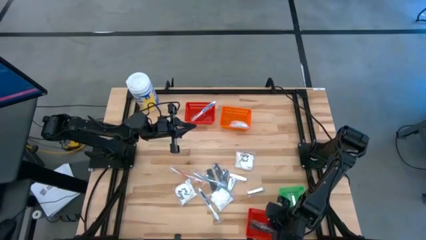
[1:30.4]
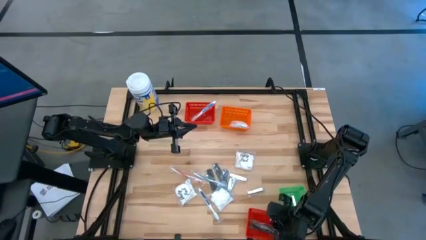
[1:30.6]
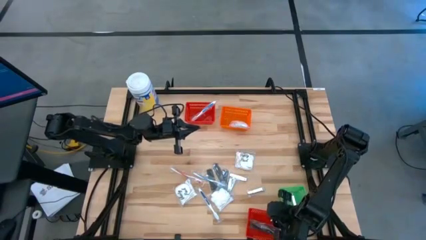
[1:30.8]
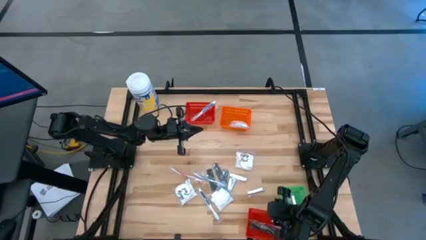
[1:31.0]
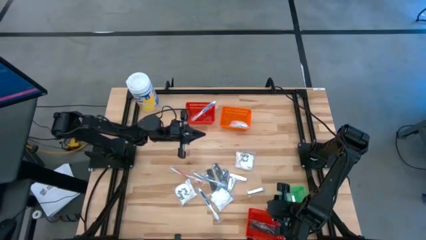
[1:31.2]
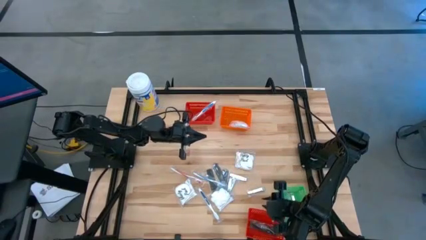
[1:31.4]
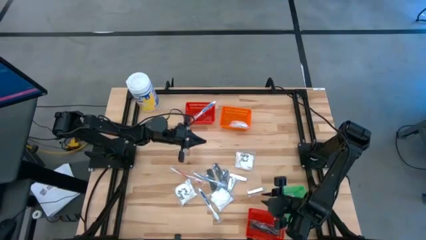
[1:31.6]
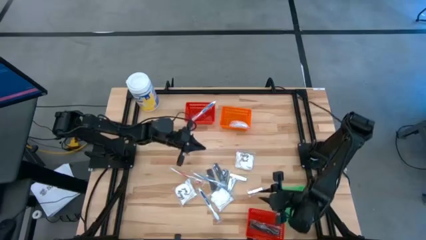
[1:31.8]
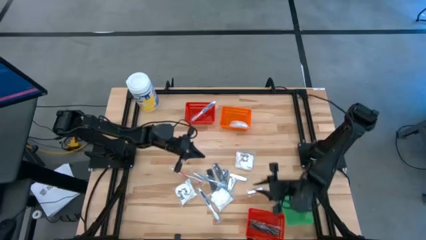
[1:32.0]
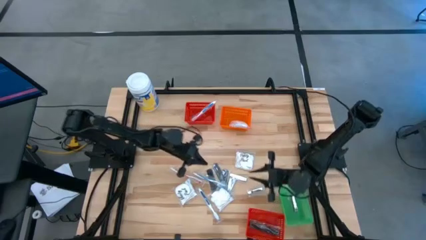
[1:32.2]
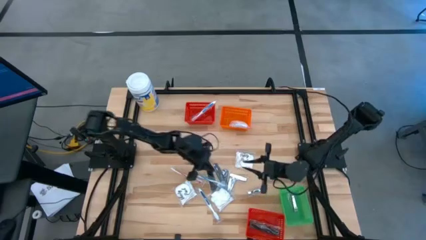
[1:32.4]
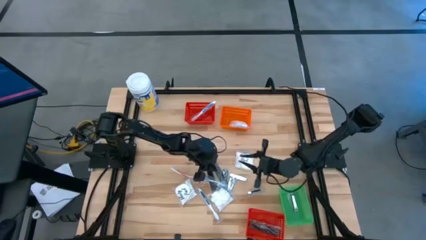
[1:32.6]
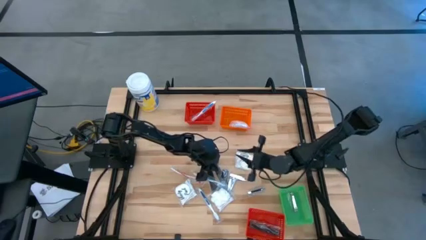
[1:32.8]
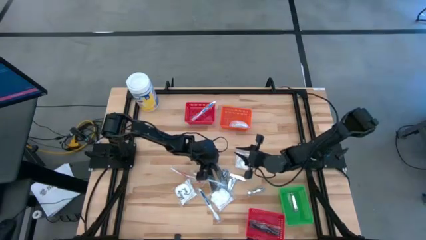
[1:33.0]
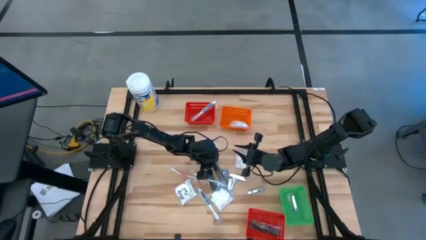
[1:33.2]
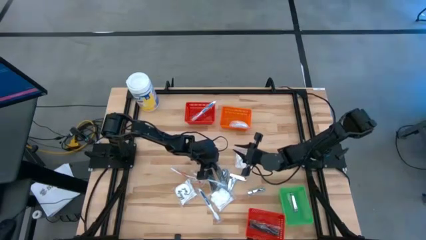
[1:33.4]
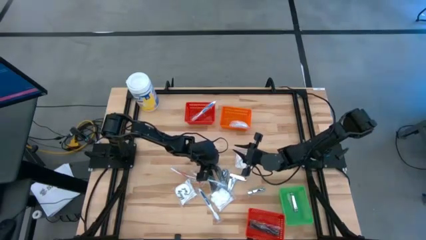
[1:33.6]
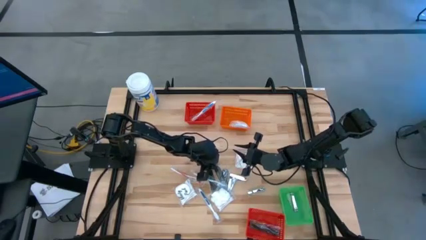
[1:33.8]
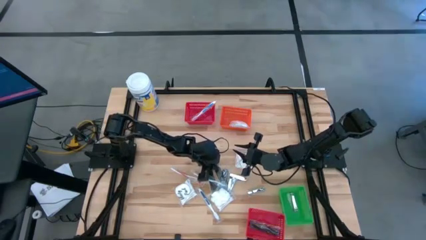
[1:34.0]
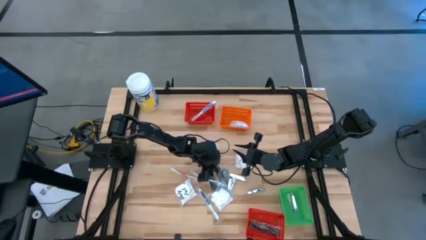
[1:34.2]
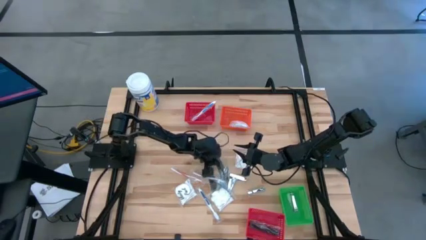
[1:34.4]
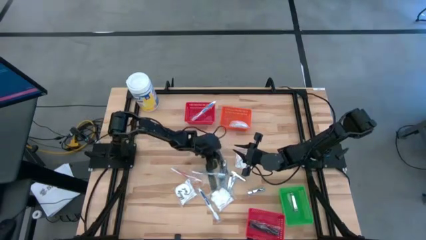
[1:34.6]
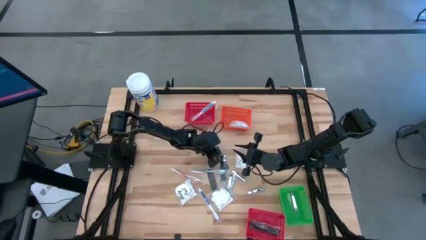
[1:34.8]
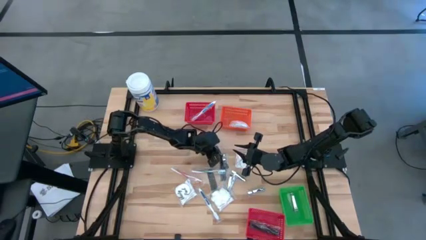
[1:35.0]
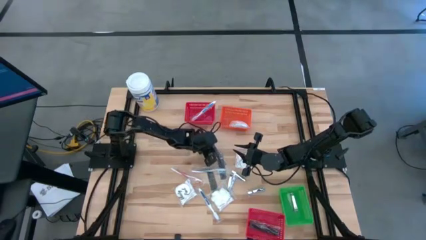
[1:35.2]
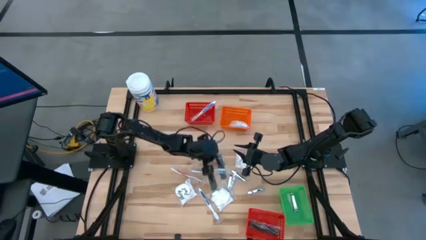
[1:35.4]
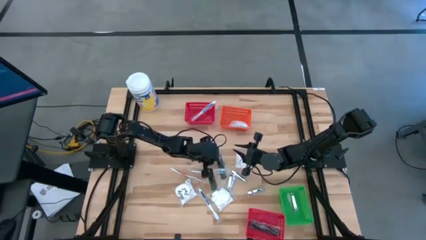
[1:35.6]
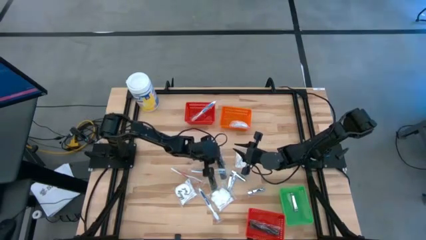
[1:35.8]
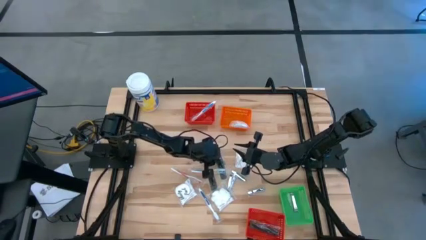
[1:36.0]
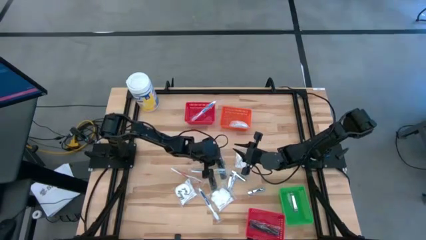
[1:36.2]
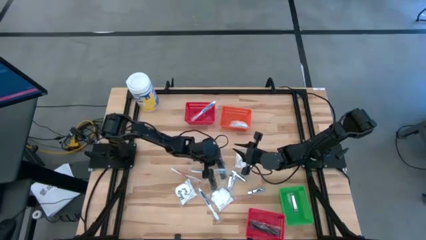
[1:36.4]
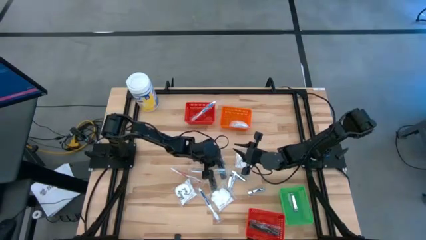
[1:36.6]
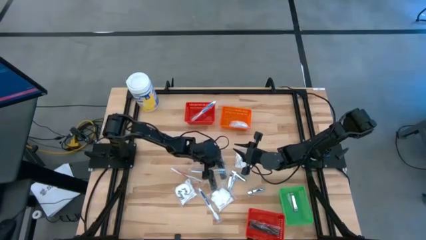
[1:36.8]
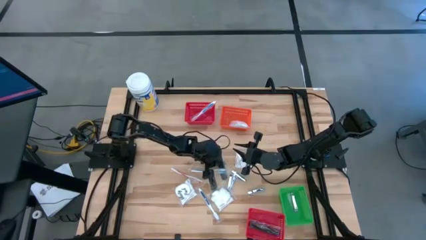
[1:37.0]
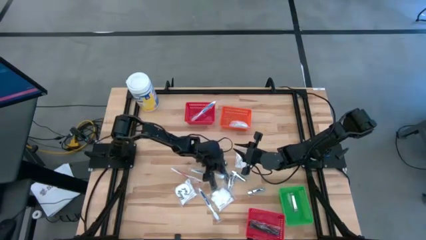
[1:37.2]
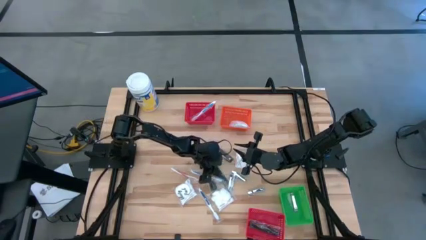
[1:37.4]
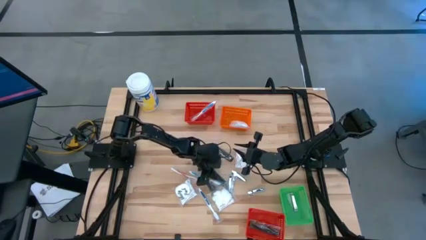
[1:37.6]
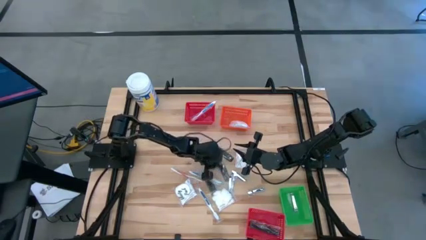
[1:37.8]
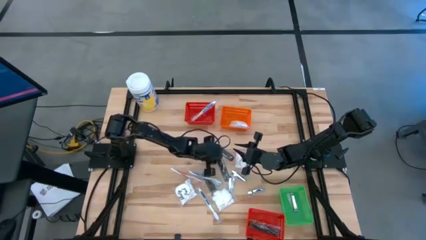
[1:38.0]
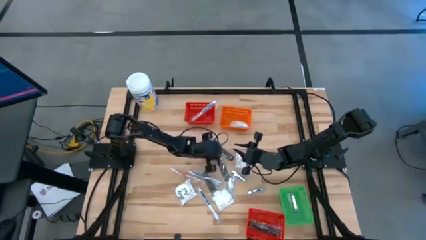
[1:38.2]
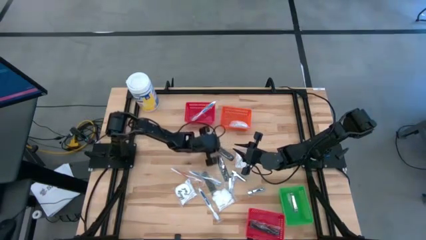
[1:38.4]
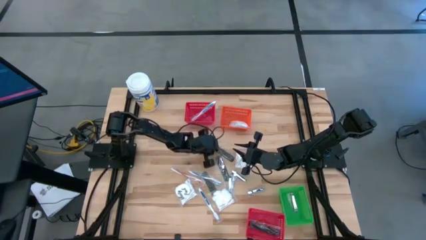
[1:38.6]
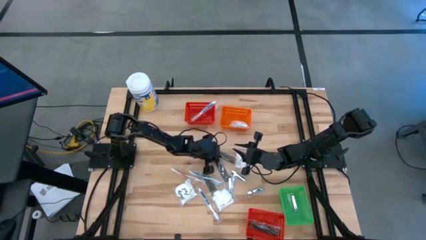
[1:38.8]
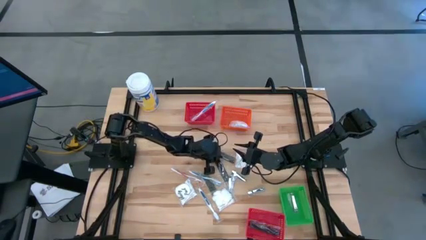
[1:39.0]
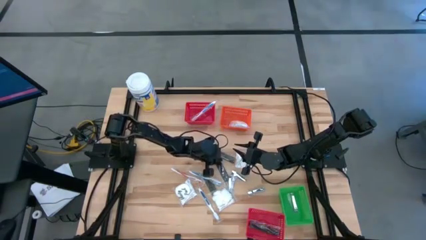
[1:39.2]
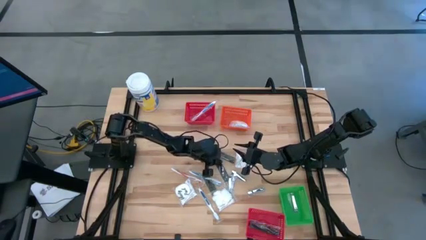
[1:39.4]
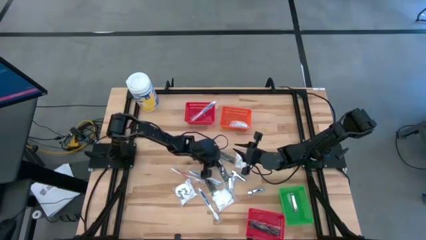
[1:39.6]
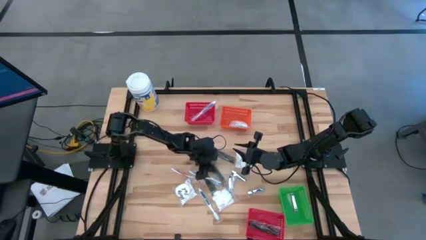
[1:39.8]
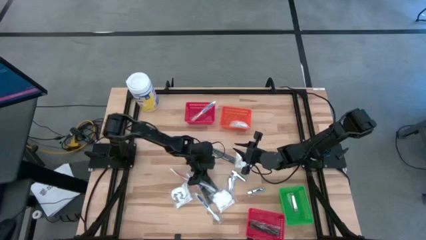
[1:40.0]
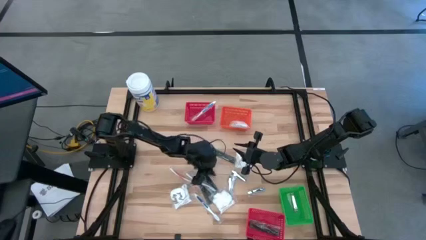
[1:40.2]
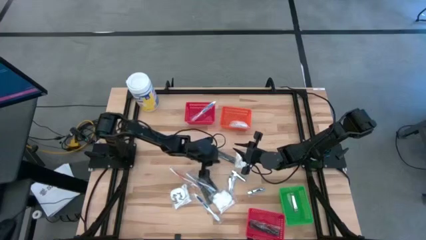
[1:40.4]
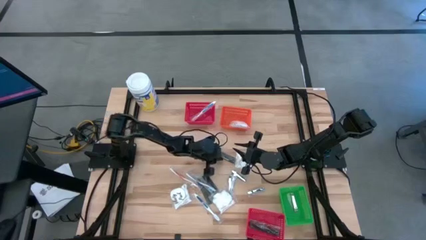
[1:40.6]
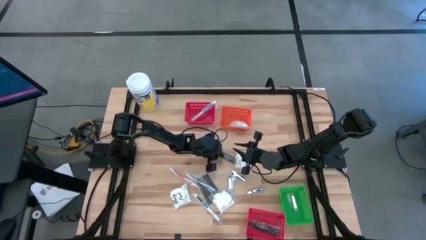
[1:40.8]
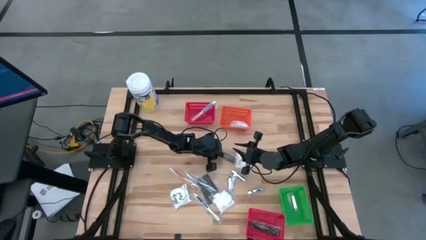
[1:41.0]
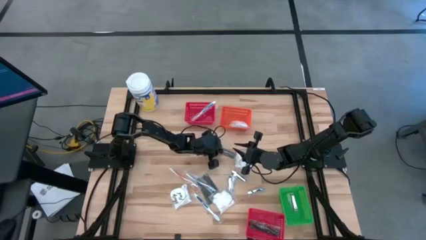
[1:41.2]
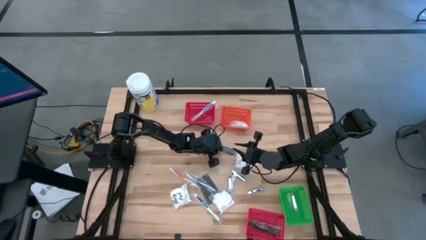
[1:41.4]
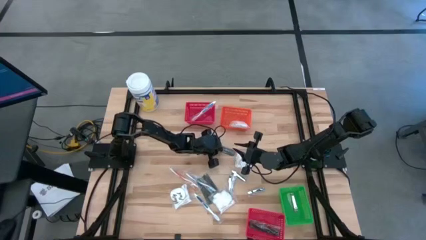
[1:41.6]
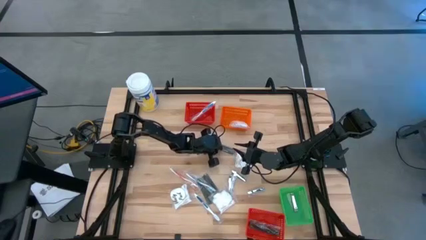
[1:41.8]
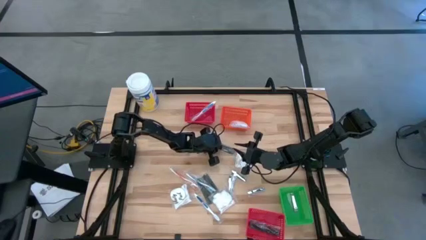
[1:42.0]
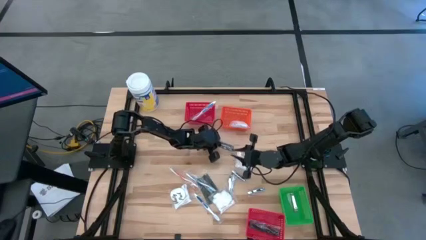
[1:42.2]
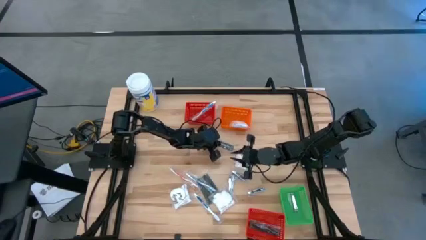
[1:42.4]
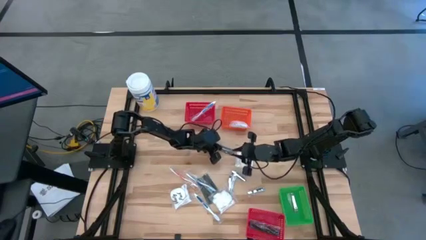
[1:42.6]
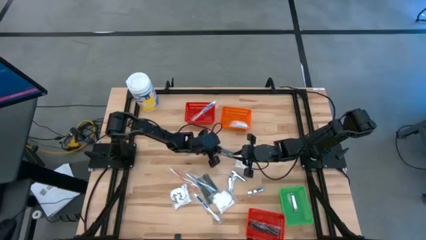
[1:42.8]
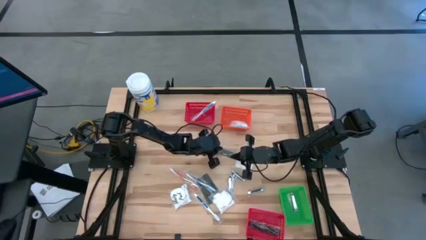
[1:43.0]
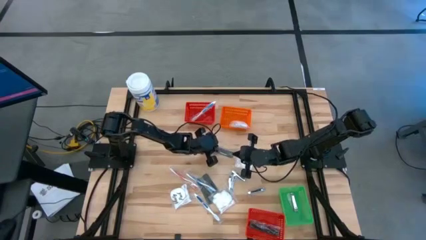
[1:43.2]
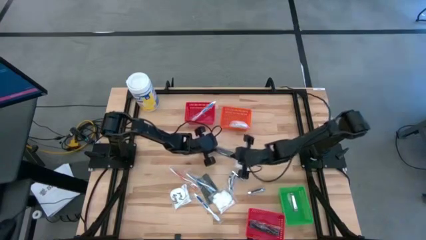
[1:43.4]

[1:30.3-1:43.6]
Task: Pick & Place Travel size toiletries
Put the black hair comb into the bottom red bin
